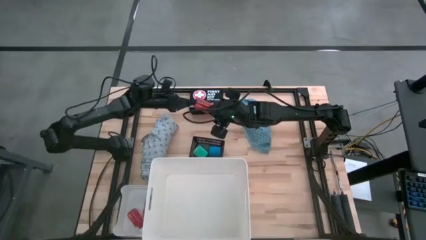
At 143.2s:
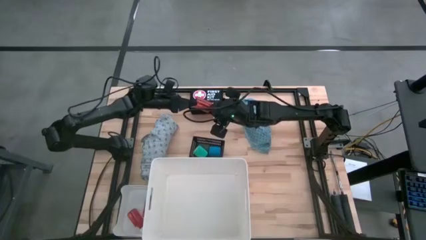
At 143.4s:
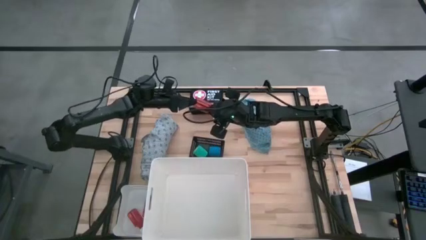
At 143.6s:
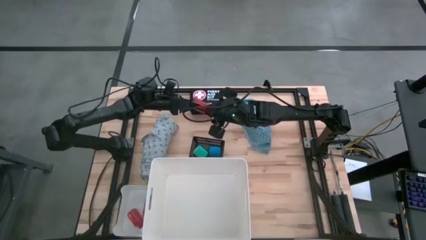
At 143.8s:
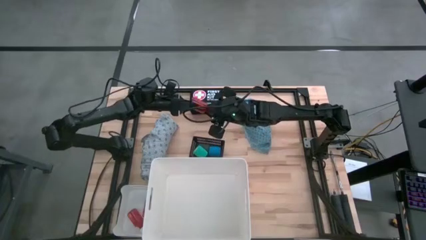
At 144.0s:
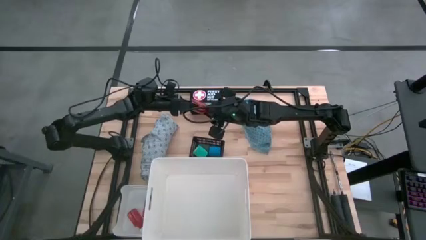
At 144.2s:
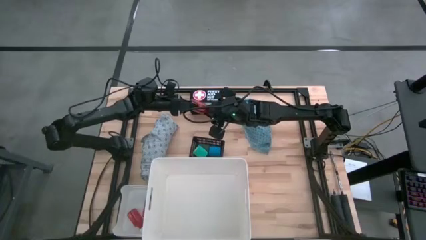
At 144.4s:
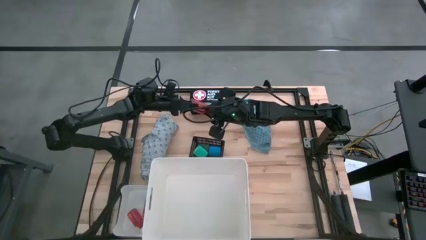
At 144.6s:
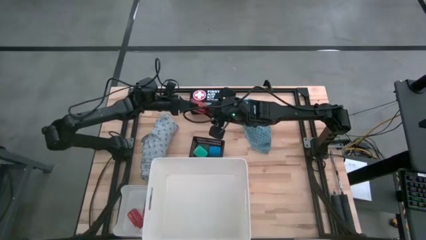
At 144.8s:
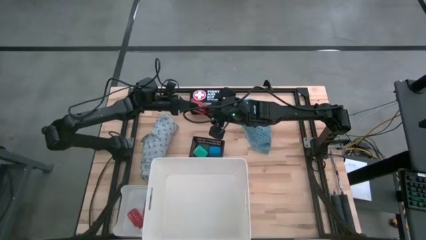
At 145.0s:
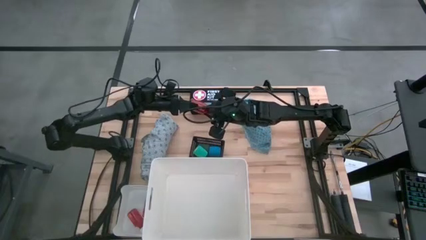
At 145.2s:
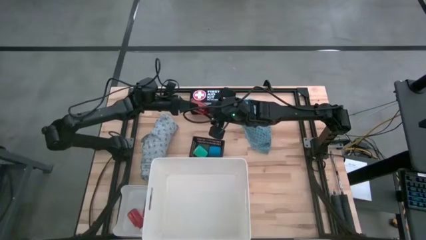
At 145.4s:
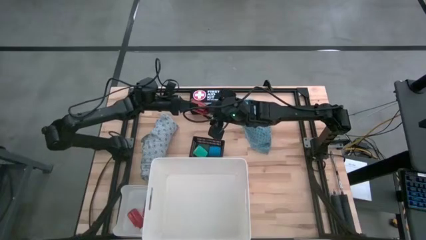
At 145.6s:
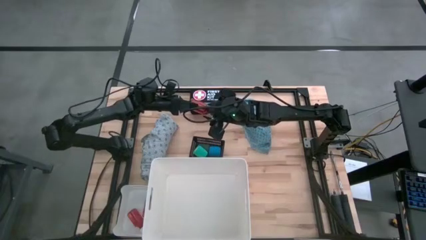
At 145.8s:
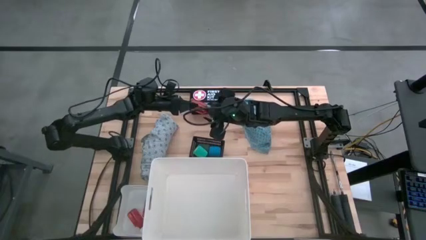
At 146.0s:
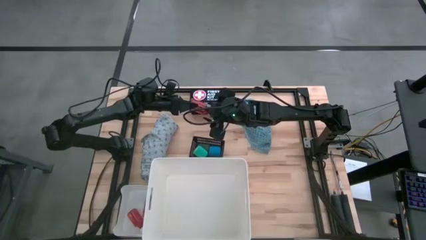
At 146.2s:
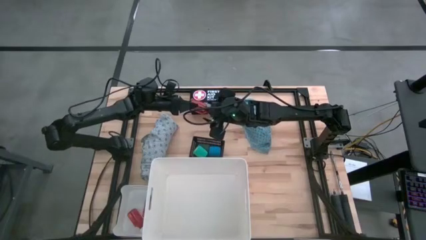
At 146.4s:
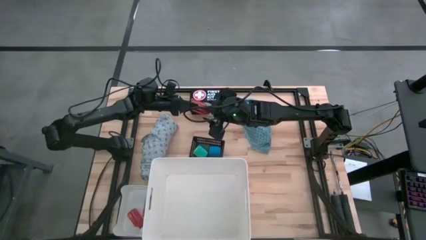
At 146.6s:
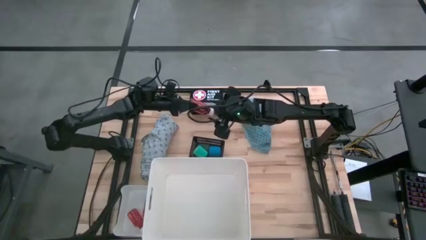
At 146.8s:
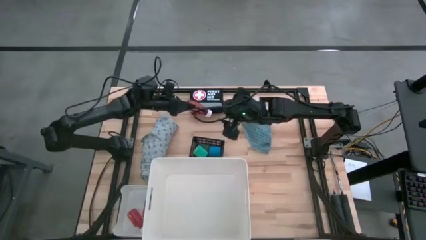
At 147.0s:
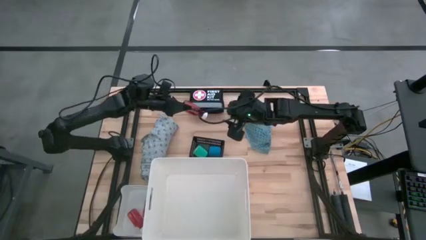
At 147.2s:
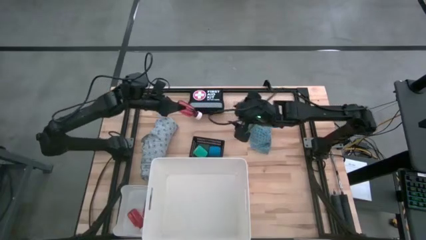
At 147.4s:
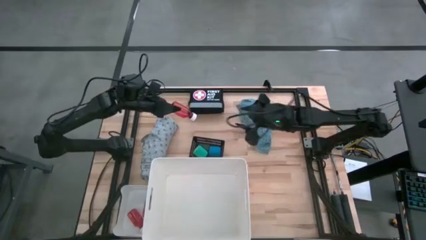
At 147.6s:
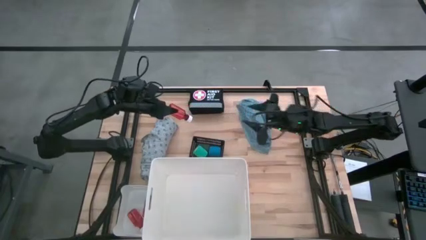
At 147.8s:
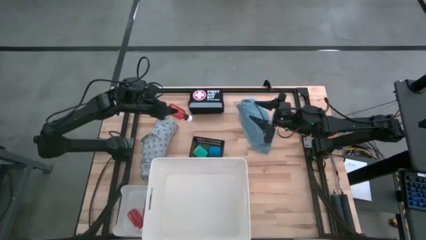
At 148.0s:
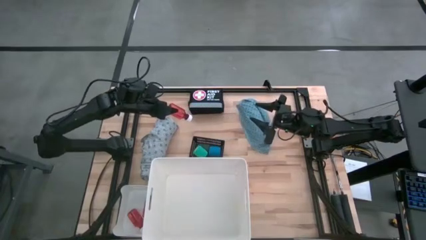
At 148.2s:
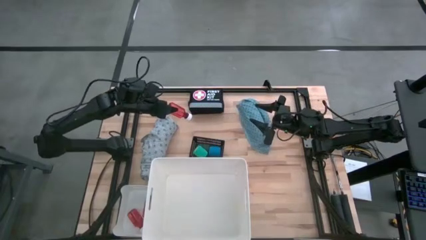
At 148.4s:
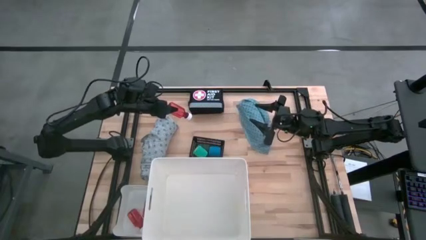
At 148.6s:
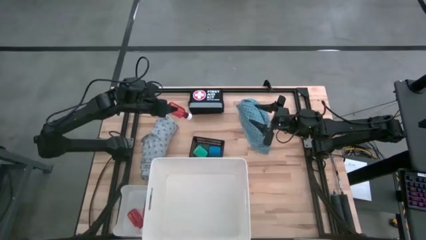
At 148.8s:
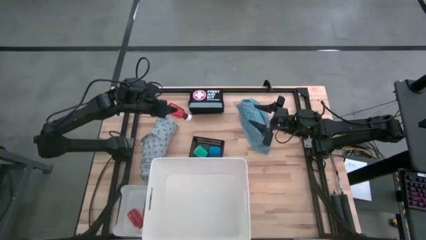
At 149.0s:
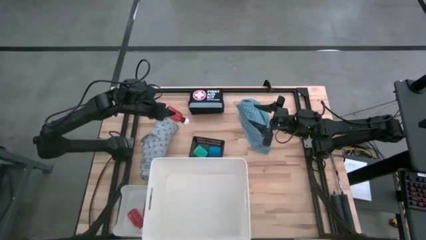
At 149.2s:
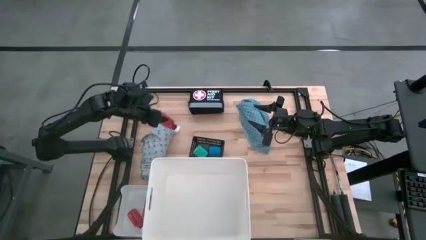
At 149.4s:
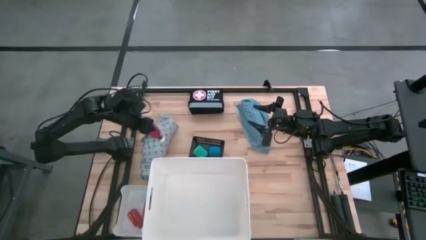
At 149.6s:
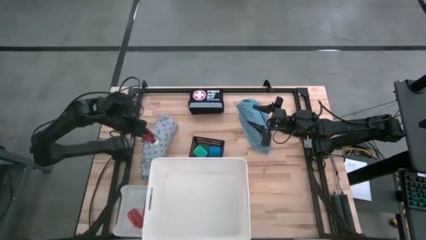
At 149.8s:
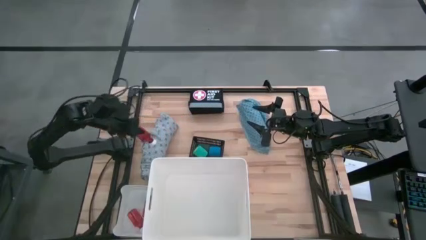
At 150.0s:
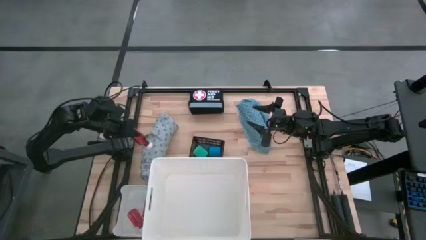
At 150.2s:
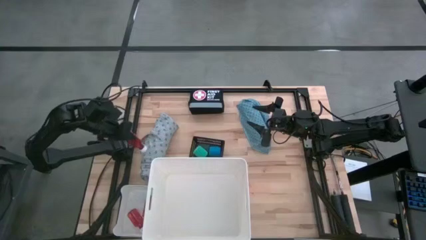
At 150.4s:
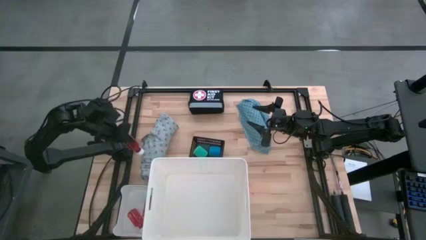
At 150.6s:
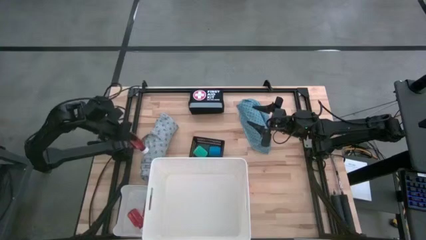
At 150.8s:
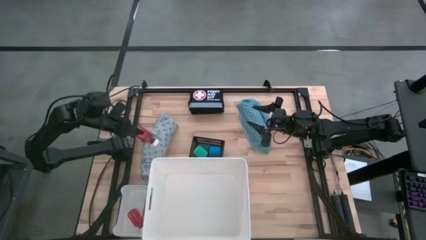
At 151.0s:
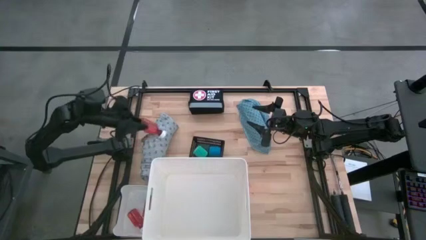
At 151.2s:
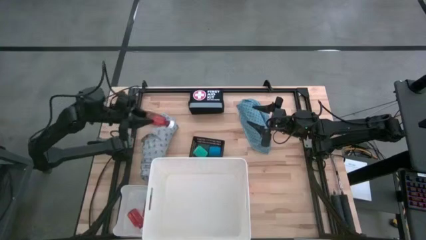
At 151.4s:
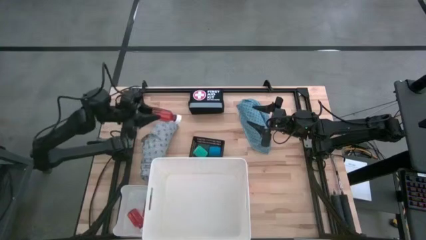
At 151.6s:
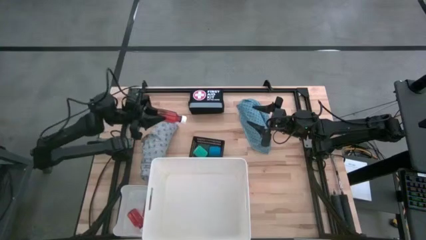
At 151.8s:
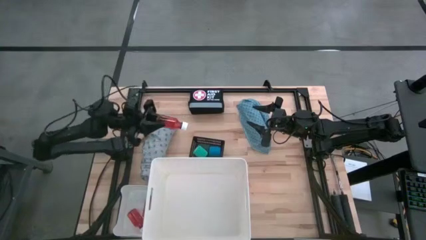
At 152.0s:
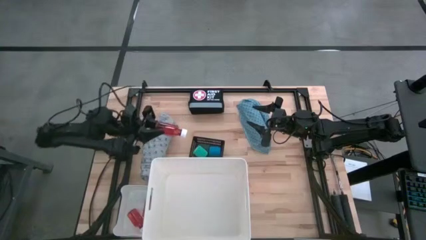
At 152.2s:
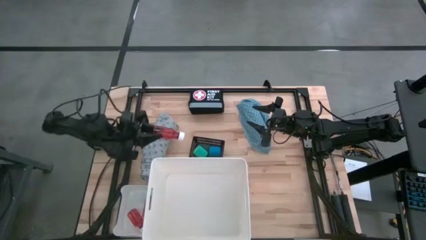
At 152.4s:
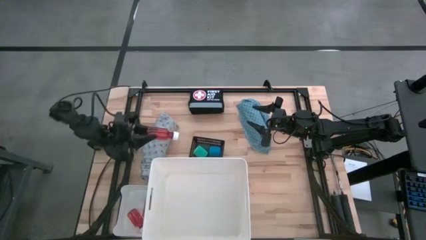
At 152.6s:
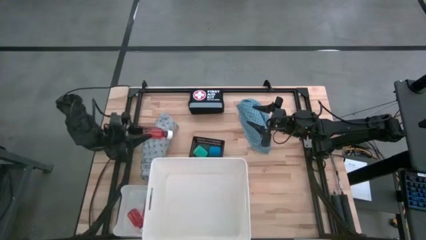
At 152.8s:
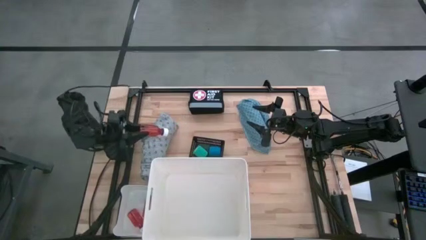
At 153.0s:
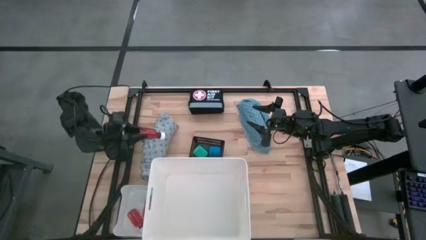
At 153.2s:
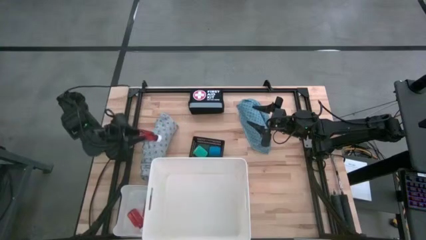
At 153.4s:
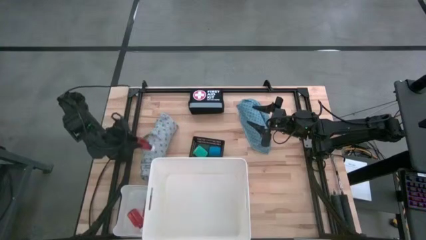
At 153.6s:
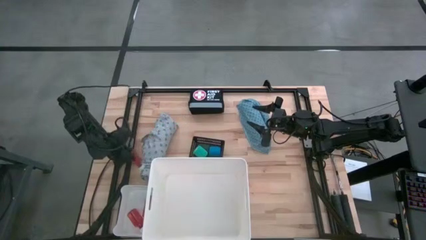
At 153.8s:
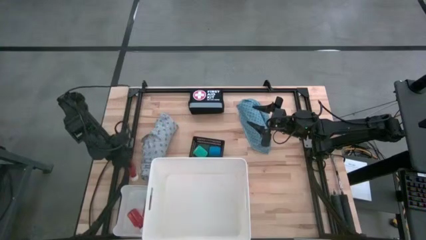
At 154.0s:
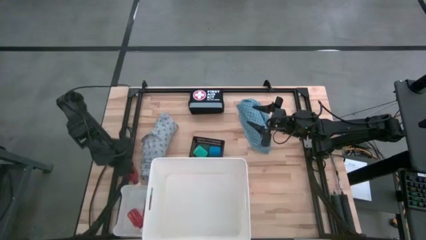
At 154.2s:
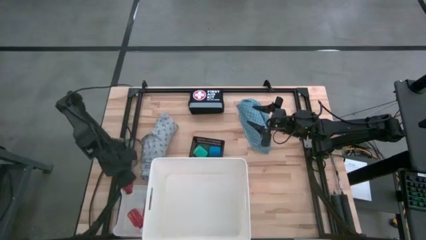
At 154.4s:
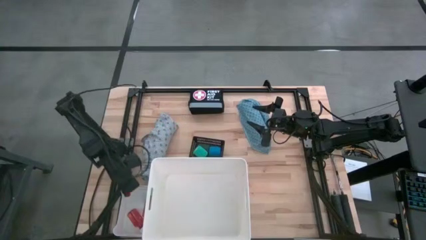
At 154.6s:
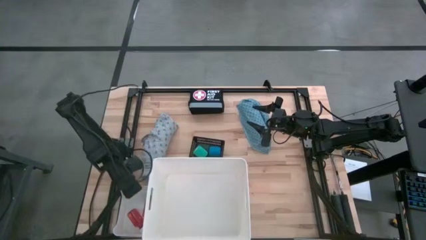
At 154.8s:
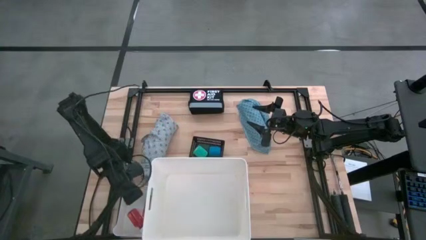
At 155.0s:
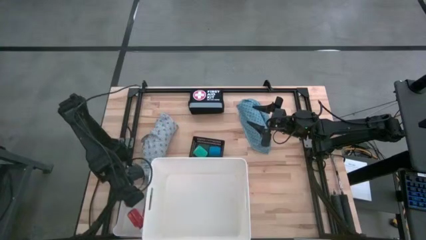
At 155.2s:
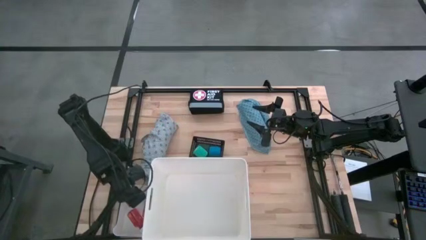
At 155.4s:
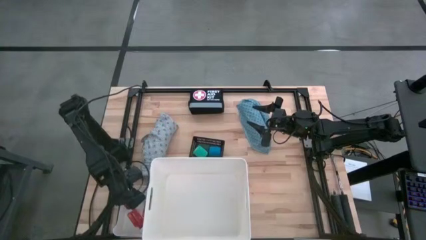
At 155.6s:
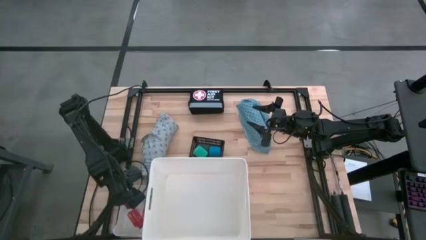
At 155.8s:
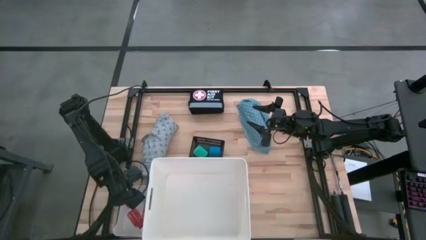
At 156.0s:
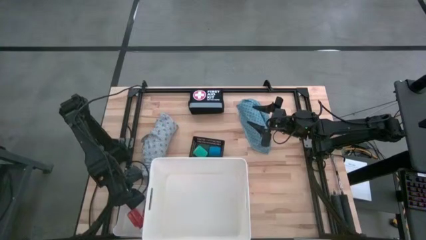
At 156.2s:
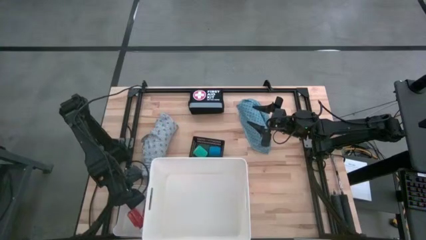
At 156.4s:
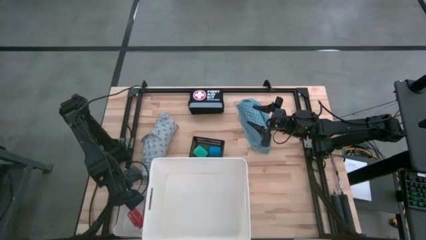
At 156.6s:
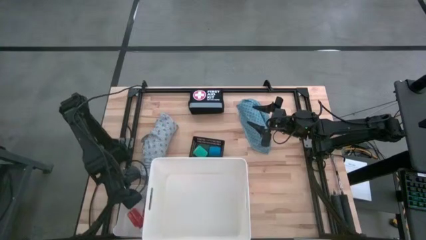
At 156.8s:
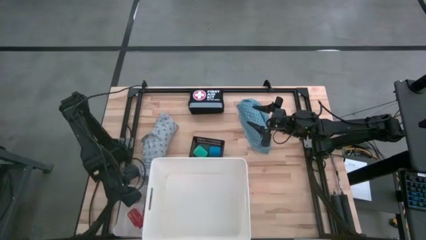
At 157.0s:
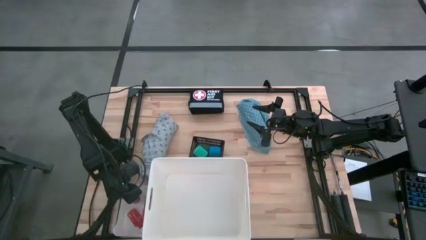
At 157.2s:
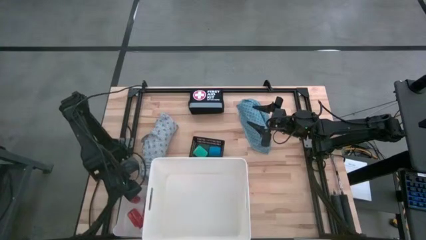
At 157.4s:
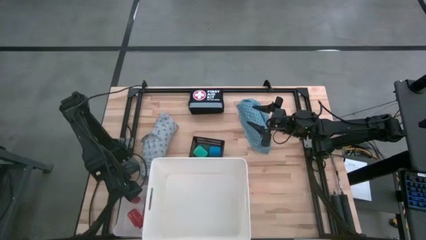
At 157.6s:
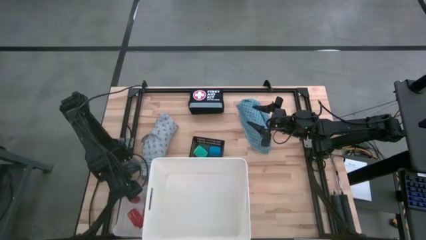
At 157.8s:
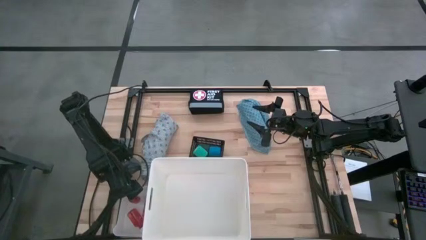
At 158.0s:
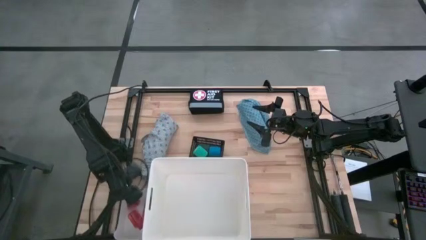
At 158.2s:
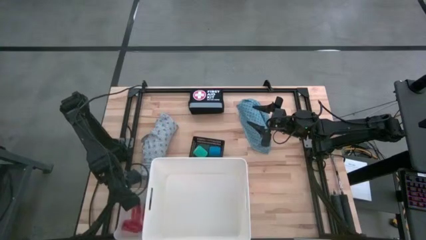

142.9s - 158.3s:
Task: Pick & Place Medicine items
Put the red medicine bottle into the white bin

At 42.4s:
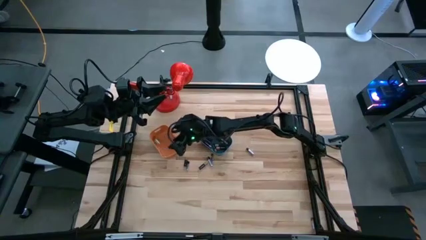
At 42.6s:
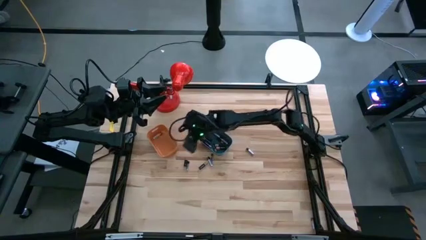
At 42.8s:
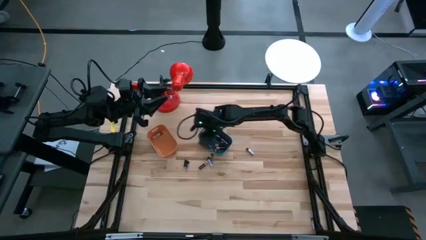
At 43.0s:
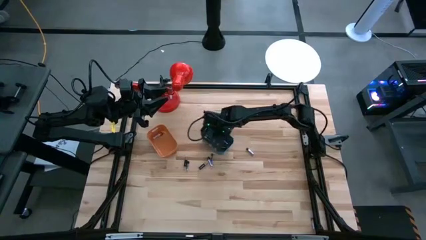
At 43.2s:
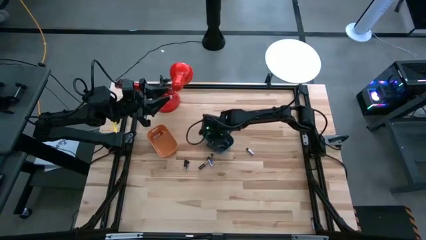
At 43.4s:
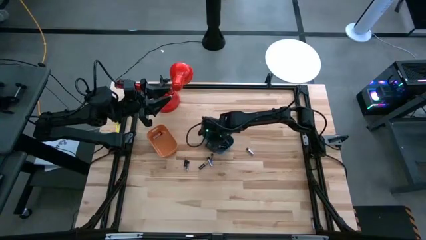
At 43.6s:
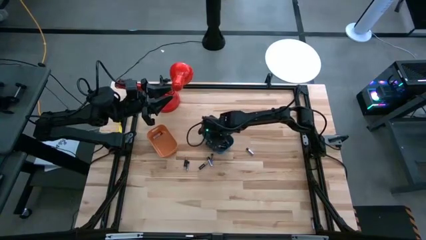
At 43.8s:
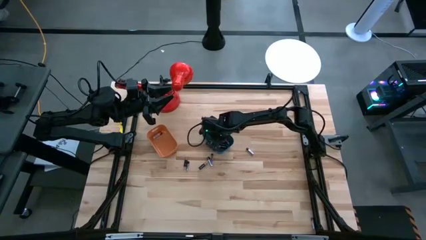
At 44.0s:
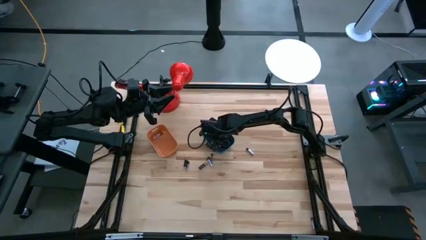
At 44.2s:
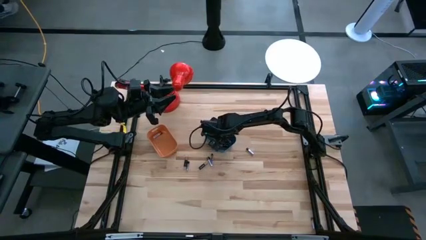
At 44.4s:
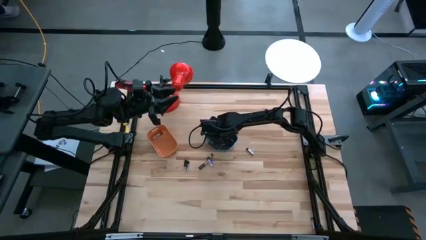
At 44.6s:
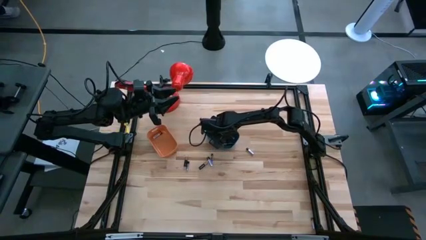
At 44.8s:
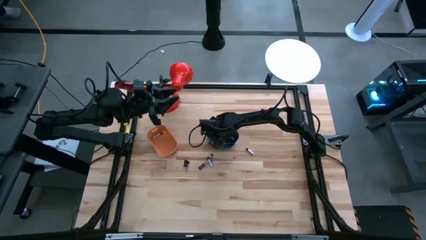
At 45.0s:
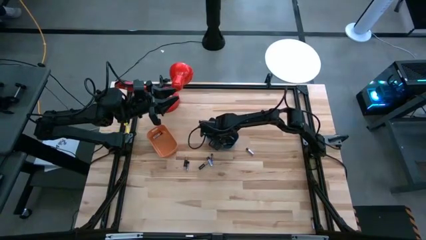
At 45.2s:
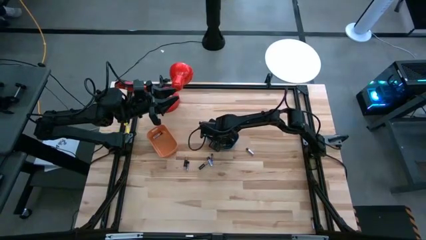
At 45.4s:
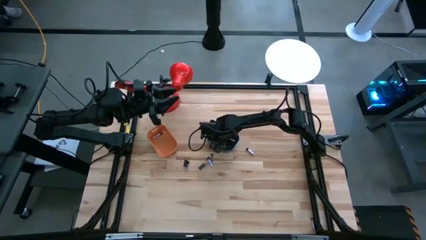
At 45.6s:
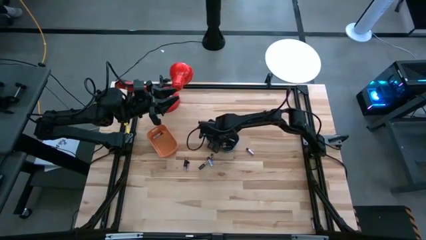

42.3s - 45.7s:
Task: Sort batteries
Put the silver battery from the blue bin into the orange bin
